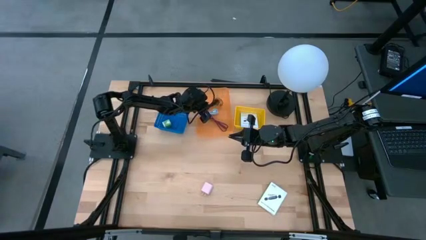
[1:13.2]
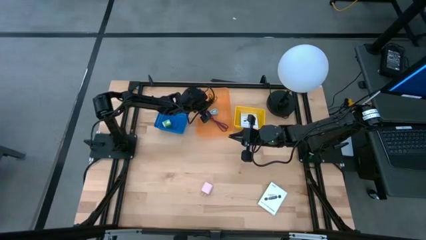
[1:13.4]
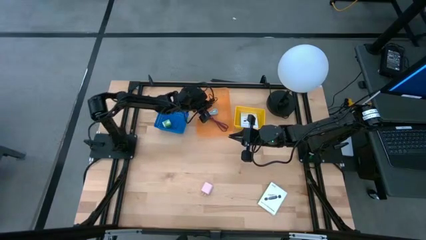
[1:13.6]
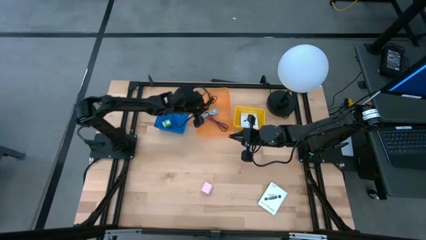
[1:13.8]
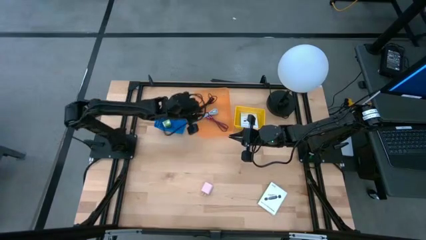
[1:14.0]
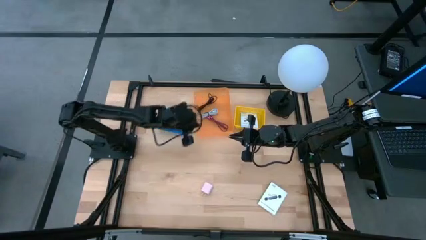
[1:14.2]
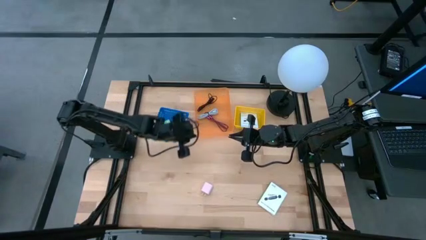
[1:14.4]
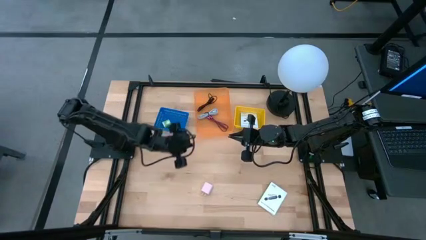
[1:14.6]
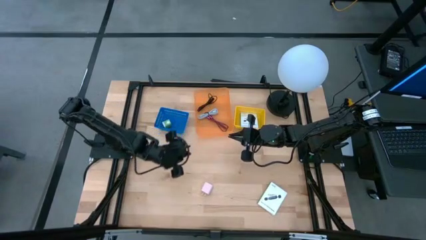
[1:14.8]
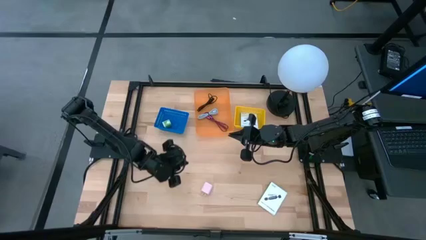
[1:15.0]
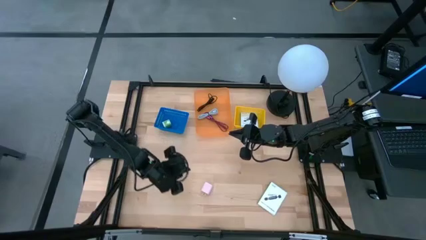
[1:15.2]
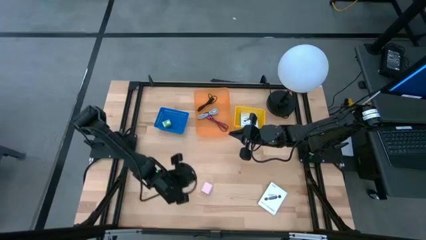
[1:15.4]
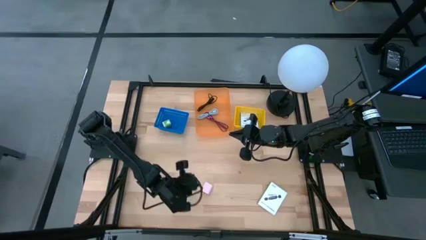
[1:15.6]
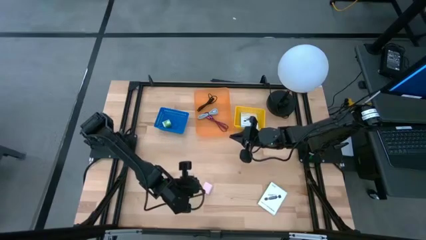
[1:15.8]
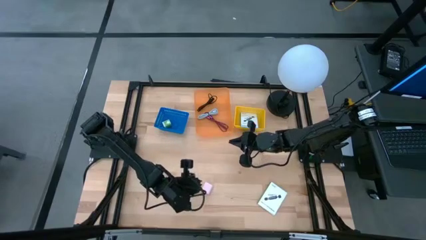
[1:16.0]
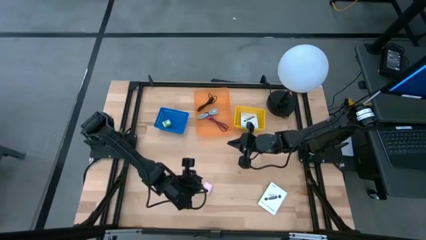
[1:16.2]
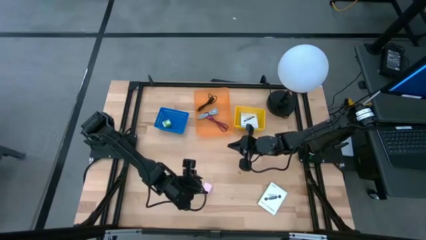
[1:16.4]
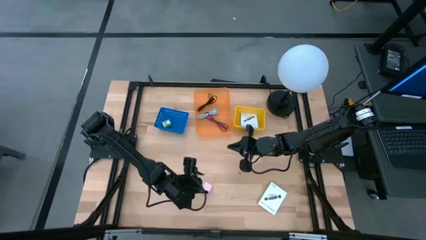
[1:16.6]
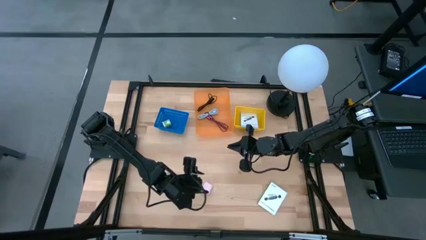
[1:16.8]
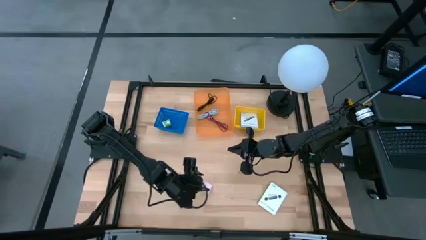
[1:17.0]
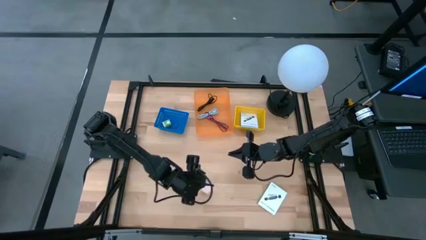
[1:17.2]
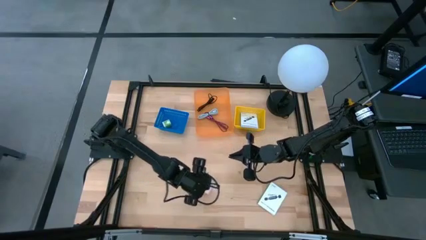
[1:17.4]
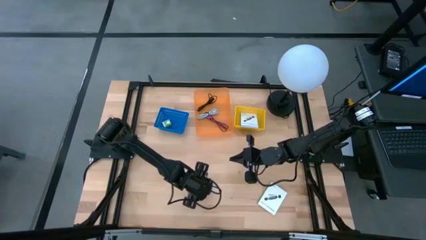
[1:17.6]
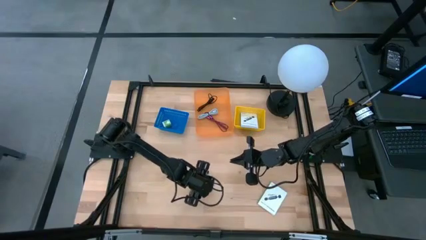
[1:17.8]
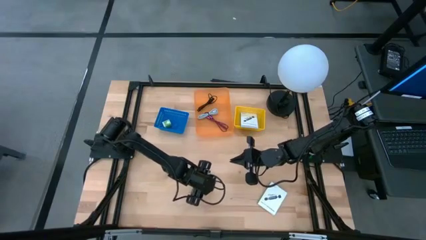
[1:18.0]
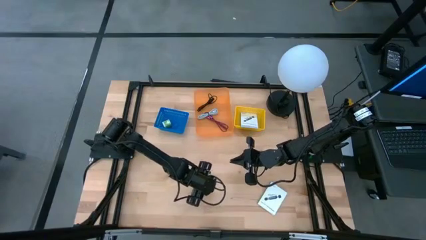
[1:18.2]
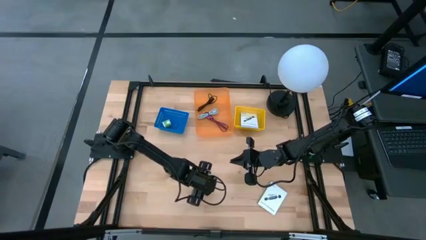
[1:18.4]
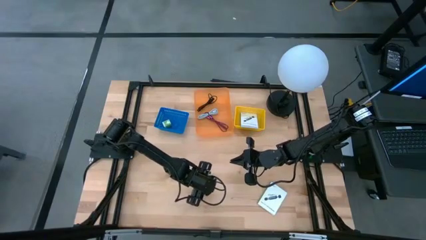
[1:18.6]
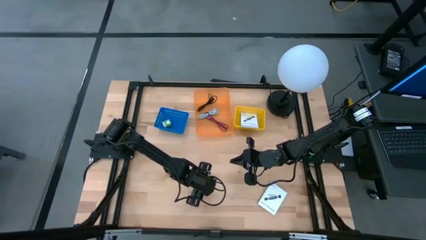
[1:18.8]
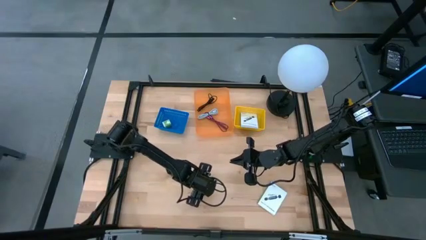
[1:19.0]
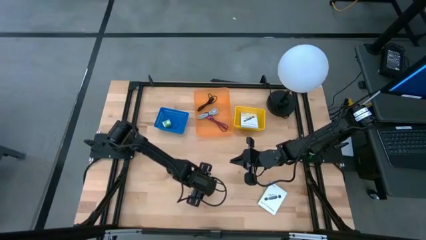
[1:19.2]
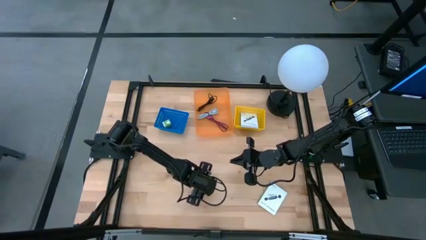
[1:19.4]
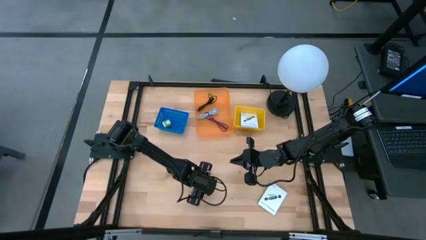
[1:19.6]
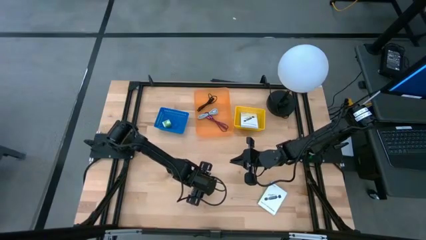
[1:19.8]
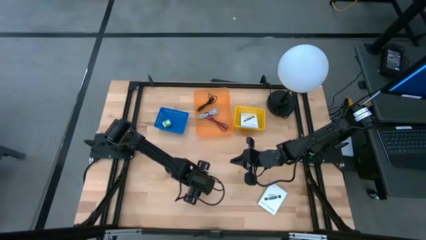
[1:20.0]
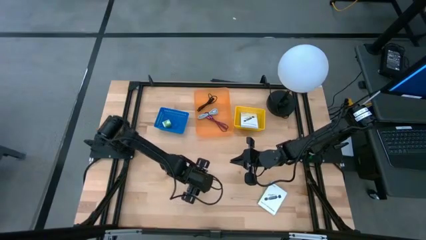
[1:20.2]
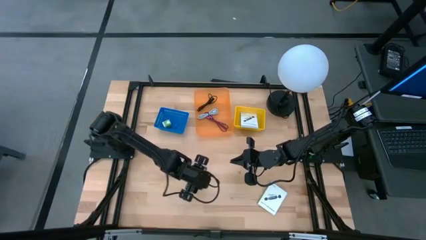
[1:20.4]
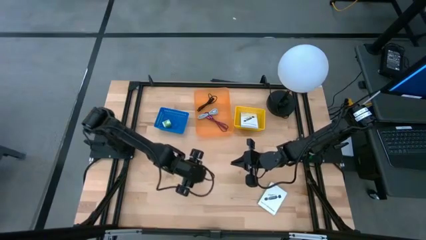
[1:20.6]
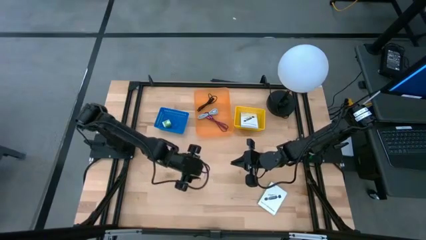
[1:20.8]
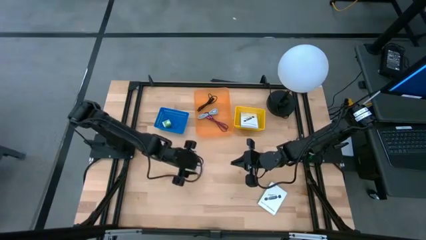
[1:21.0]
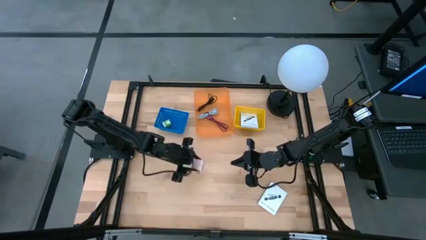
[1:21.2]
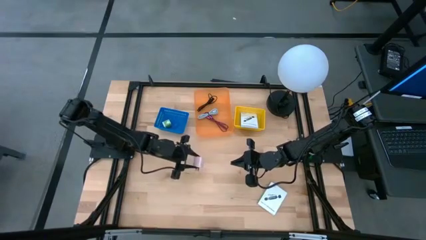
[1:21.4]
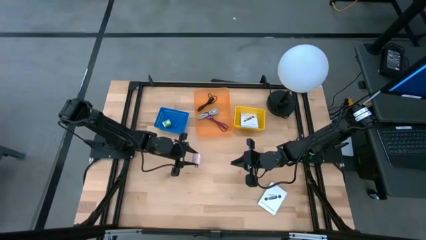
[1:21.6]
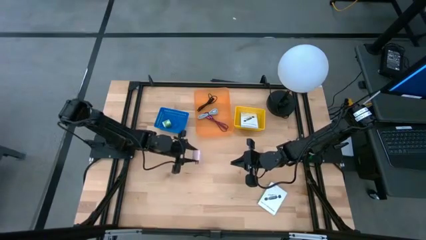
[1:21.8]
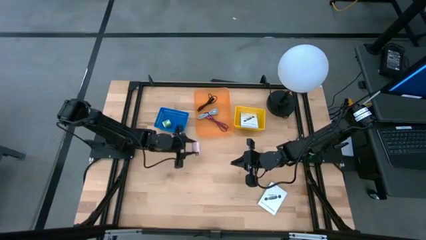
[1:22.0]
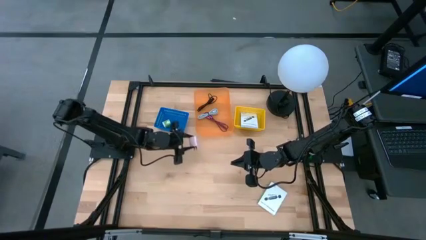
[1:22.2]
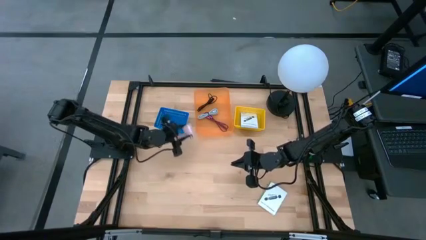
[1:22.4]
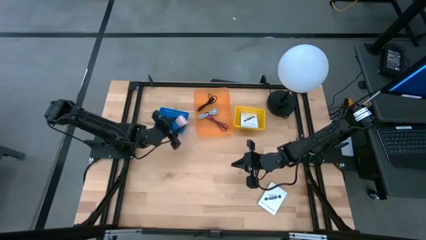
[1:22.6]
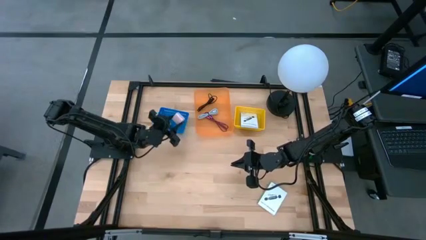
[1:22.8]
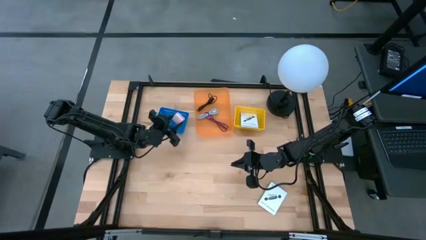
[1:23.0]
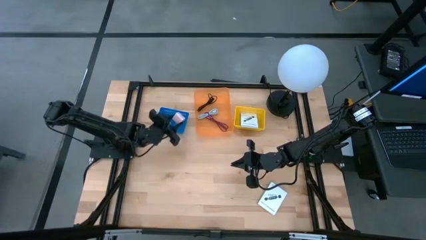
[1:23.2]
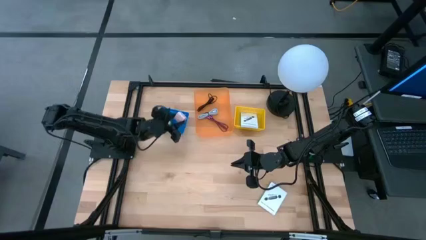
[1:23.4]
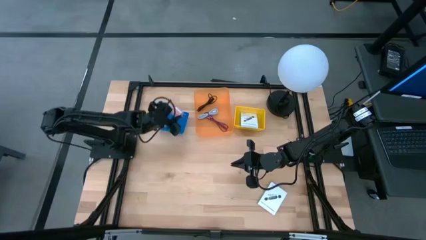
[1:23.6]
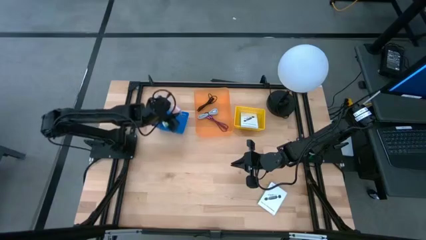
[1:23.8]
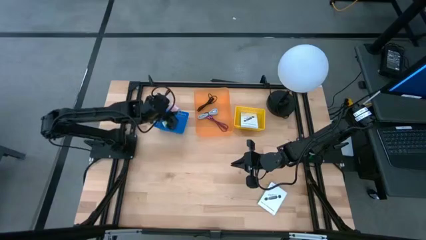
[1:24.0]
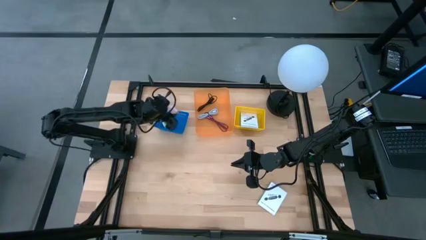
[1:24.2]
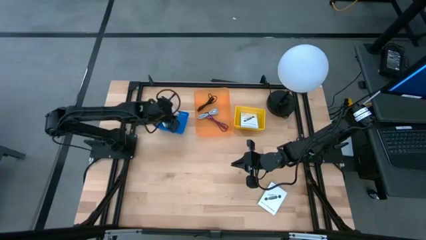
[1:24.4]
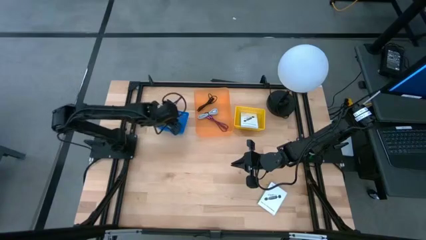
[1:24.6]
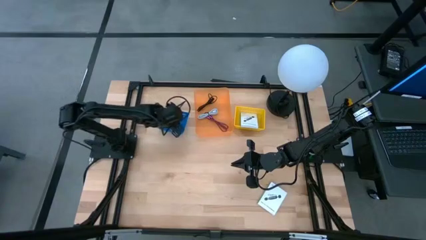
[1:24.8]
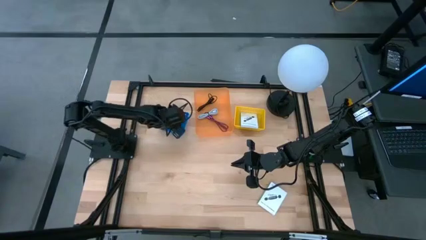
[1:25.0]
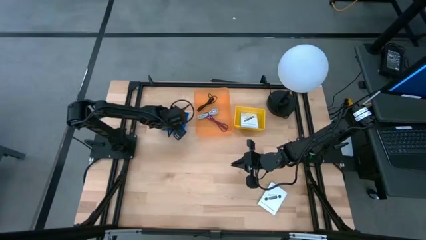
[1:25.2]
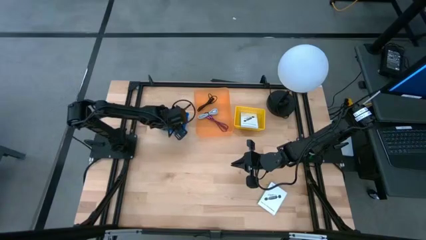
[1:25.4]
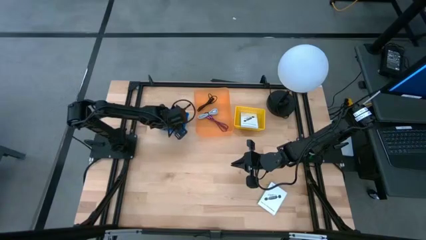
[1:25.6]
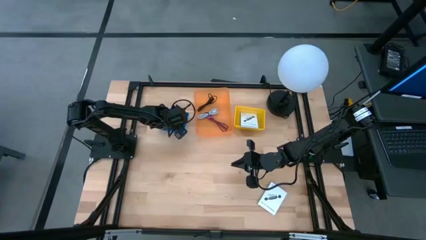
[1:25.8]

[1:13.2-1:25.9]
Task: Pick and place items into bin
Put the pink charger adapter into the blue bin
